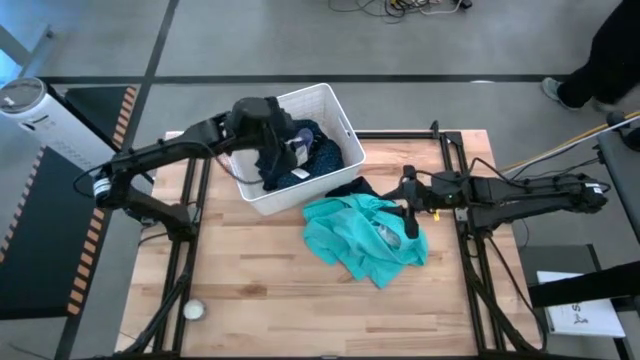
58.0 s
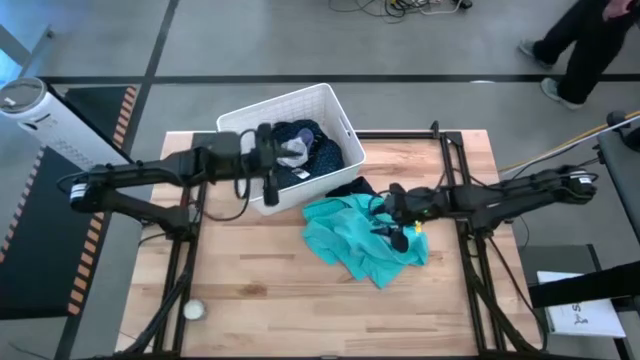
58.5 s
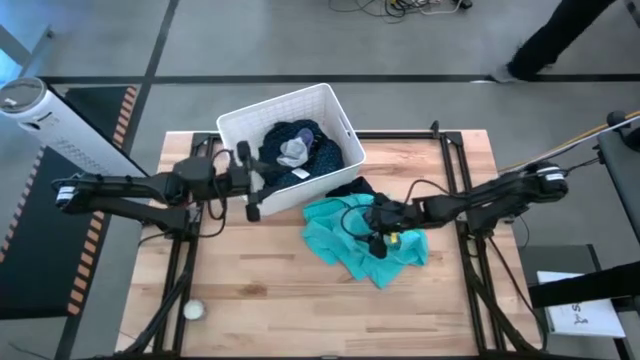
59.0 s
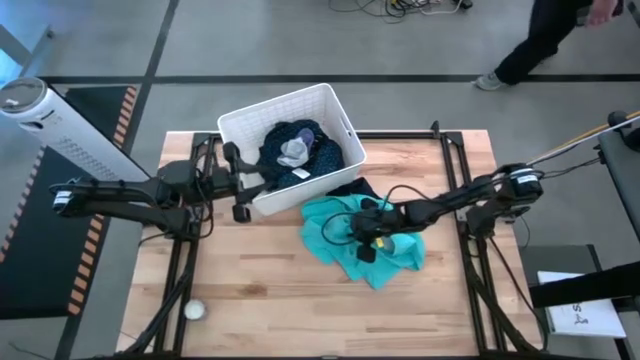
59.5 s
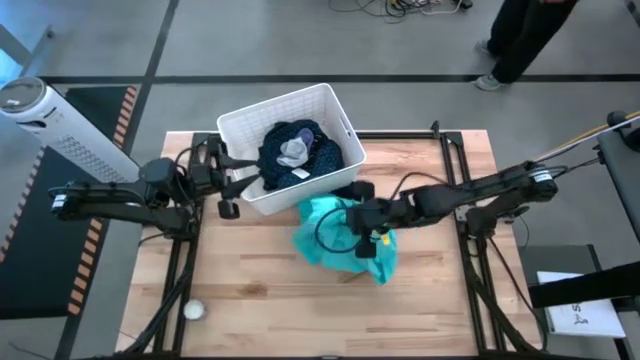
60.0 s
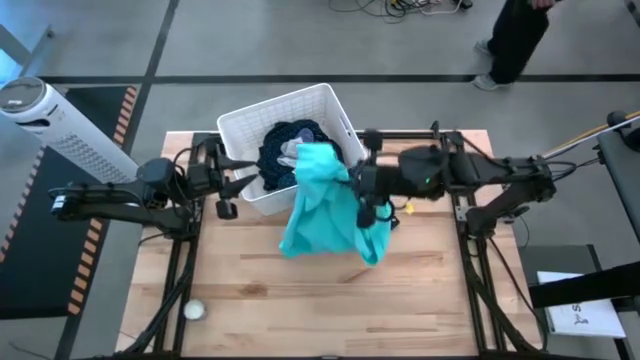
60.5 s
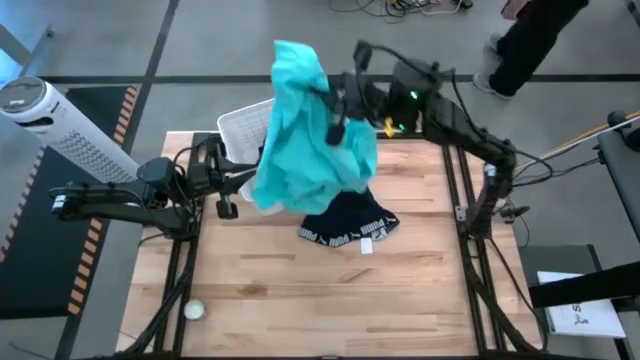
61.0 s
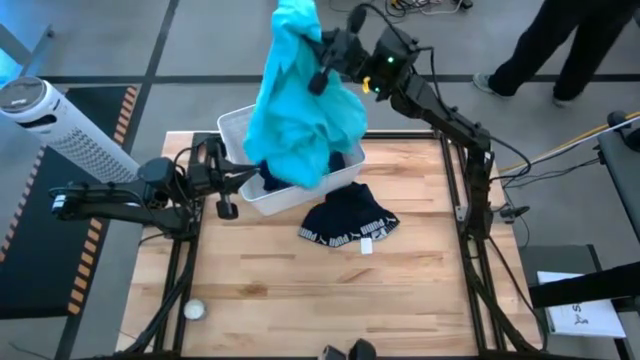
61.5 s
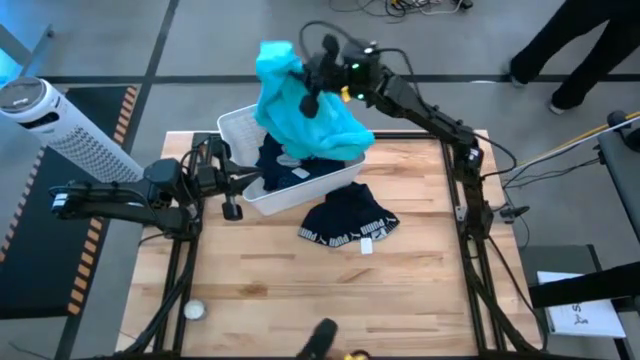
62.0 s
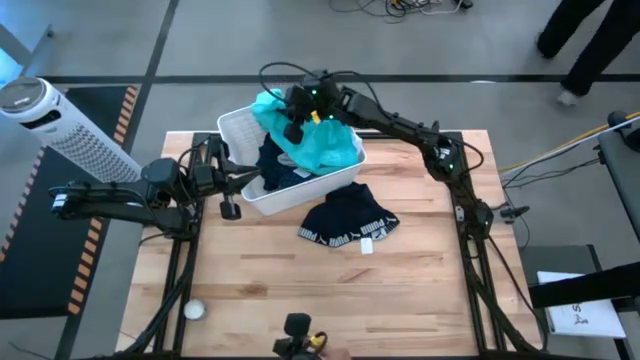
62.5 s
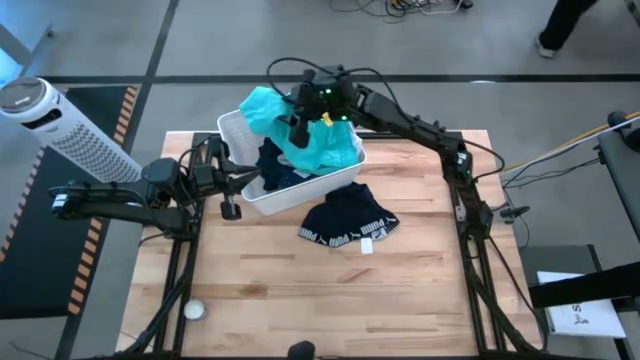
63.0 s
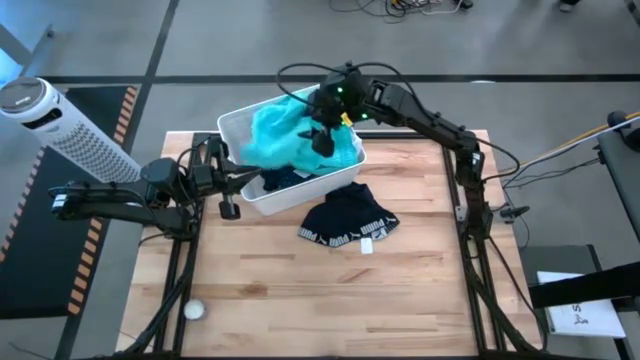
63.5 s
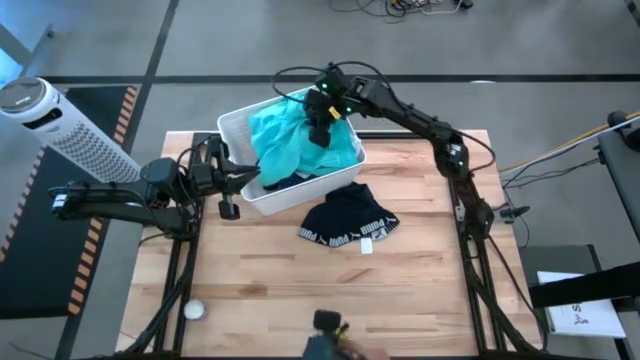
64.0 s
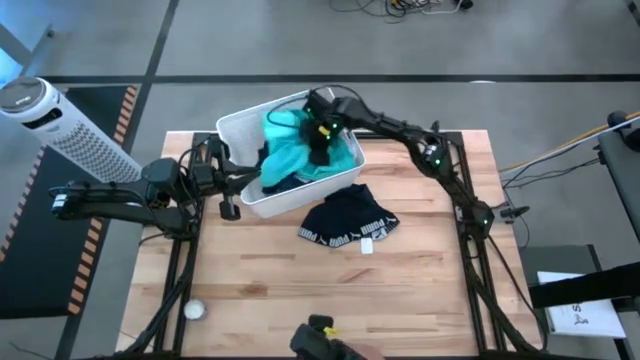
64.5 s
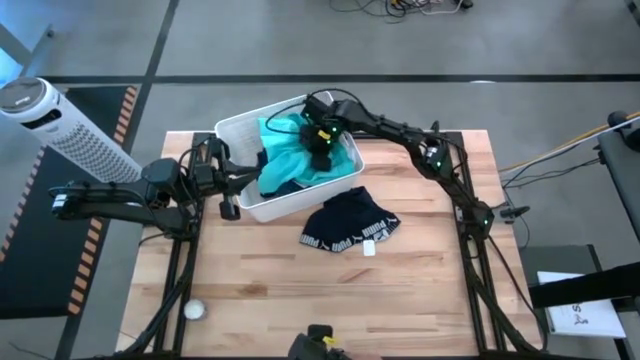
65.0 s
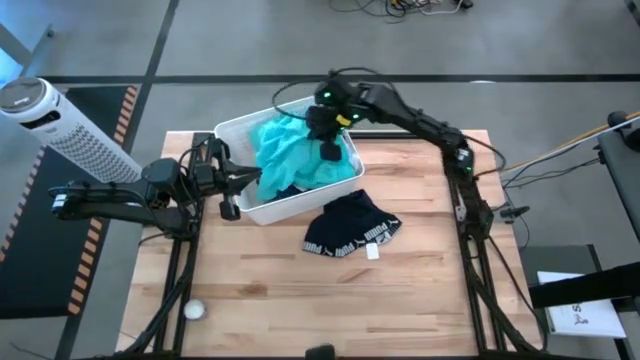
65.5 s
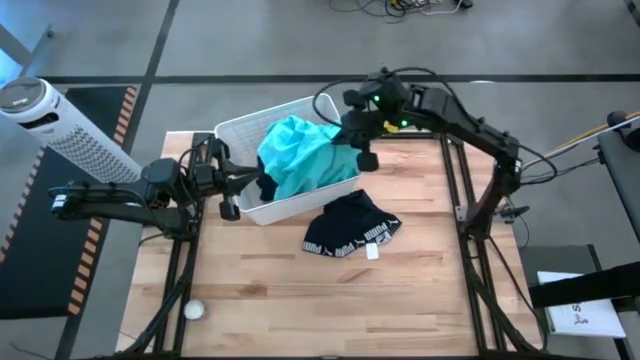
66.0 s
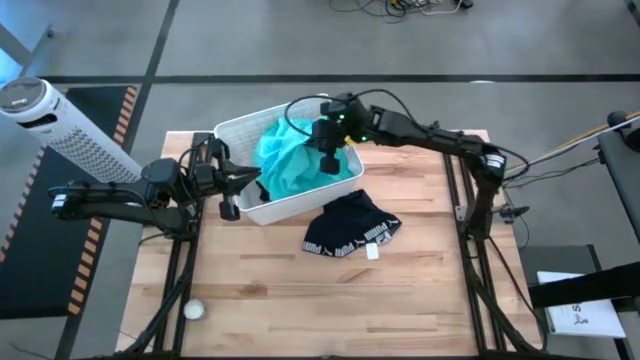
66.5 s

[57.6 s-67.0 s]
Task: Sort clothes
Put the light blue shorts into the white laundry bin

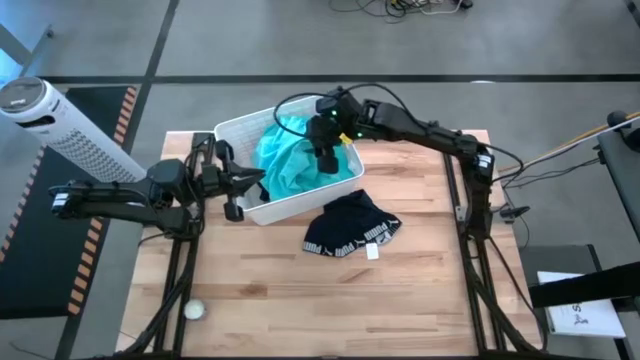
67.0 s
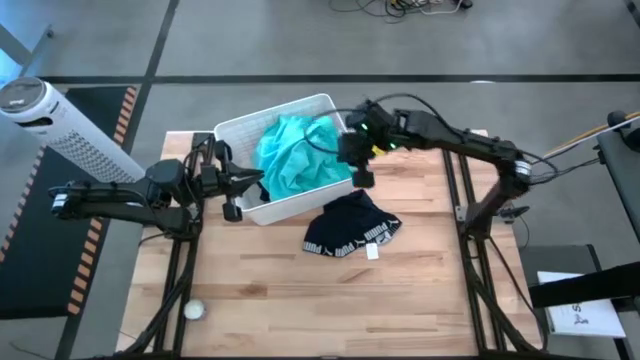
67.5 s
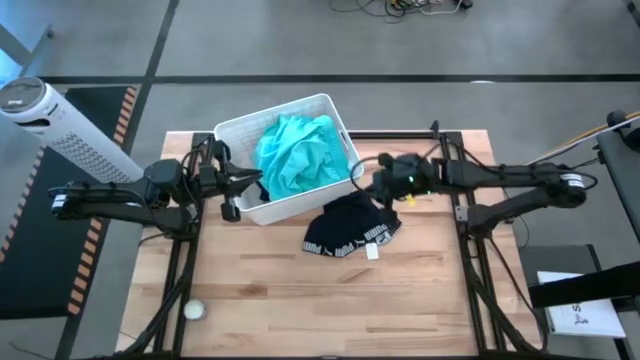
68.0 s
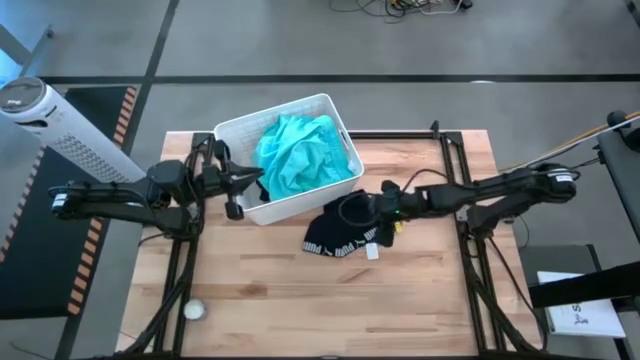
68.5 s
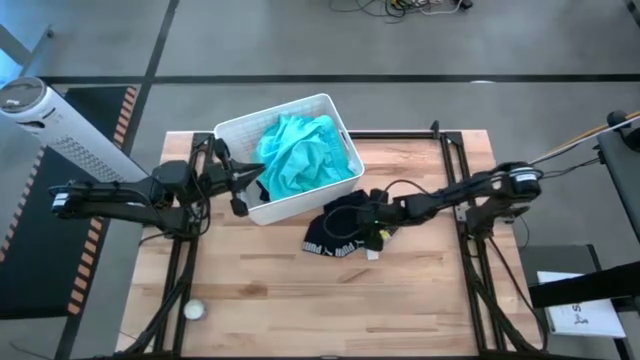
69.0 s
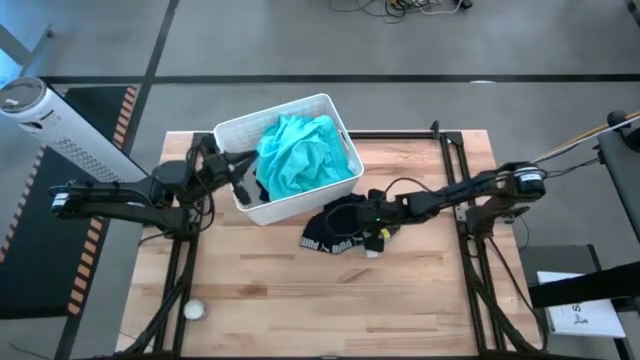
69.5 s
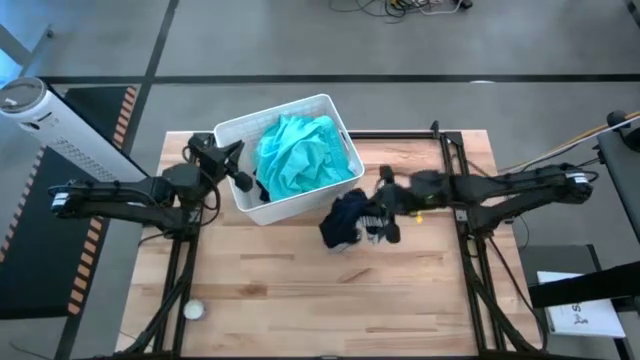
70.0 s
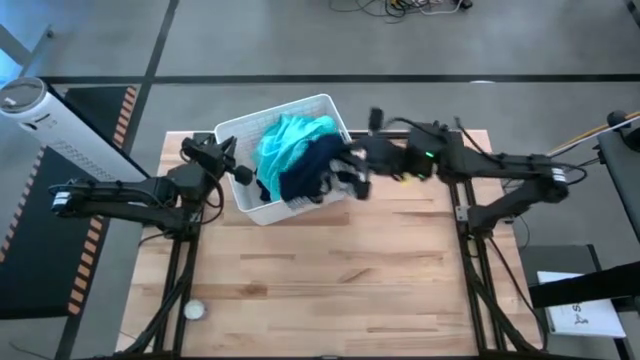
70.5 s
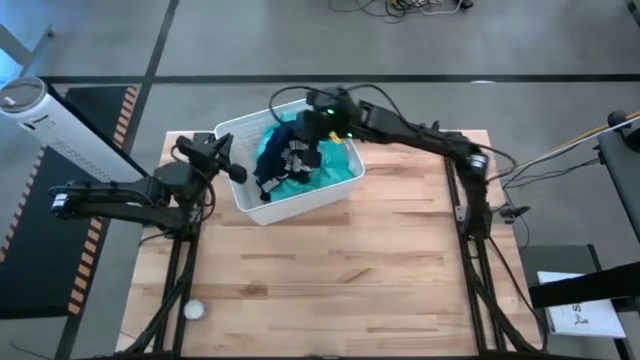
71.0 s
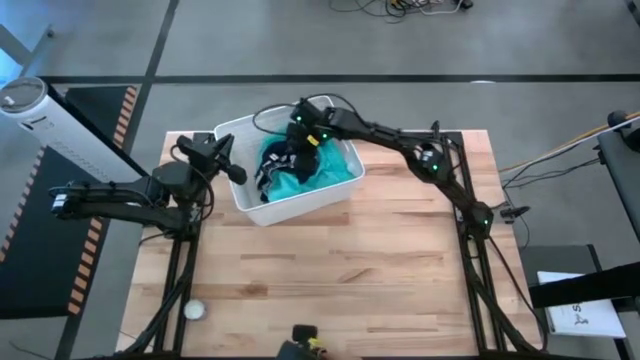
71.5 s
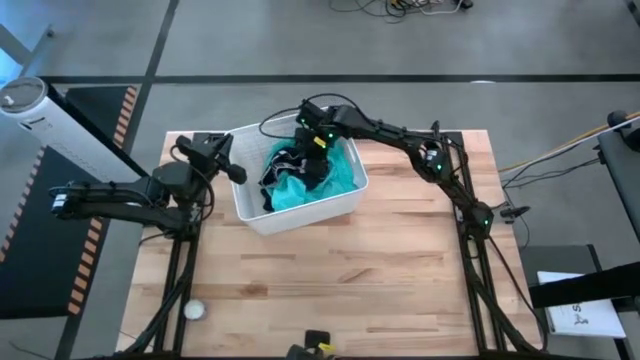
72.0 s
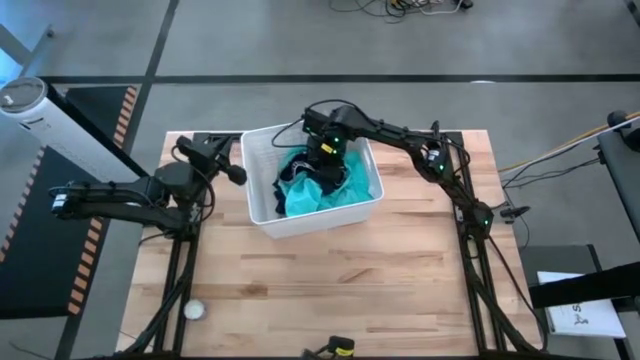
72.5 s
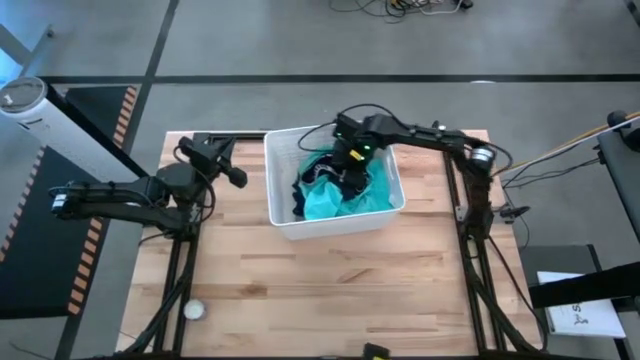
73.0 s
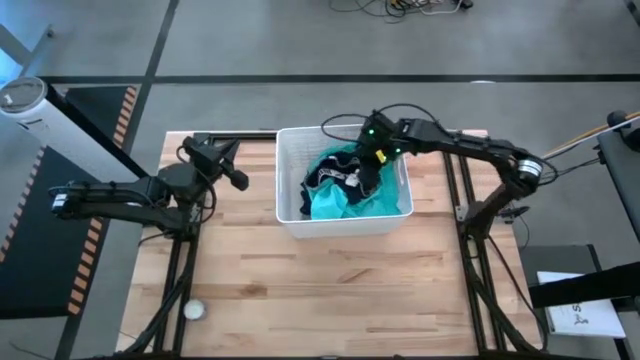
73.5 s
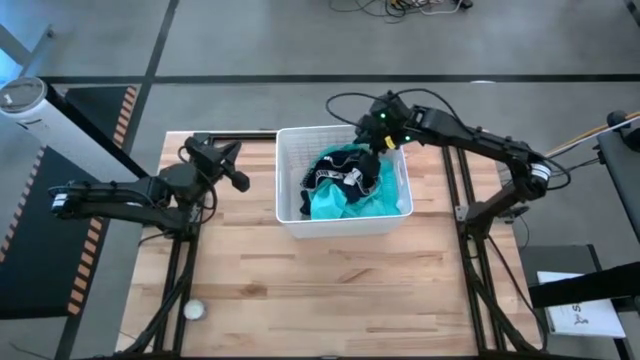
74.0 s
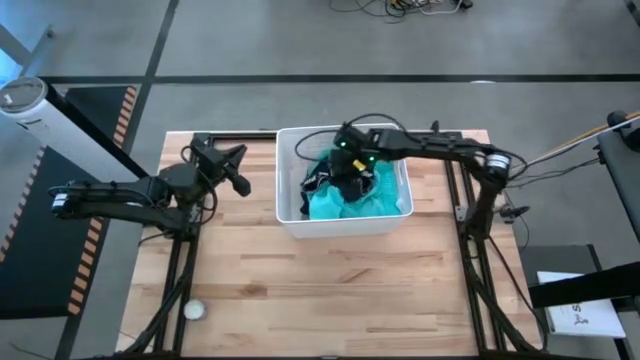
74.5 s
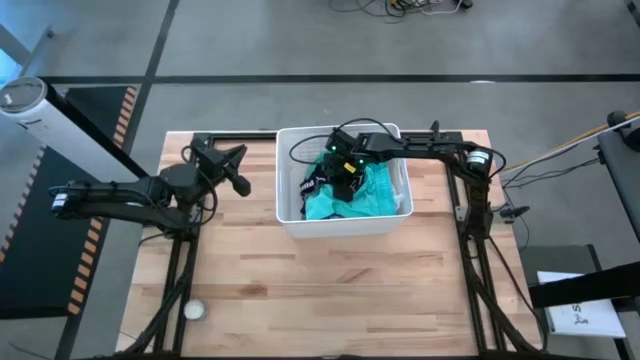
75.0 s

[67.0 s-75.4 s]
Put the dark blue boxer into the white laundry bin

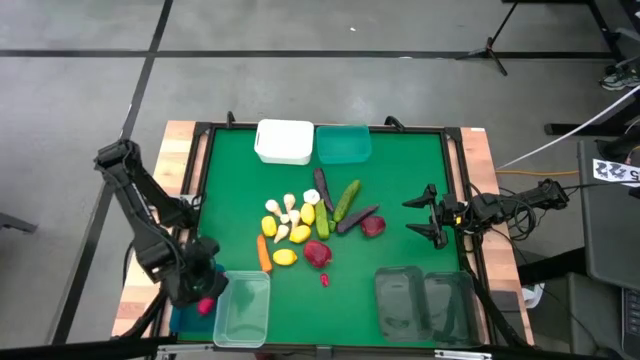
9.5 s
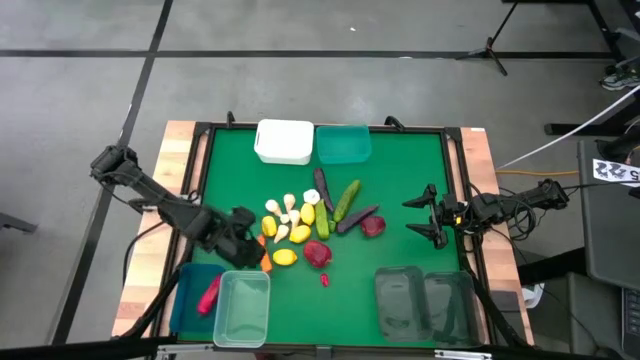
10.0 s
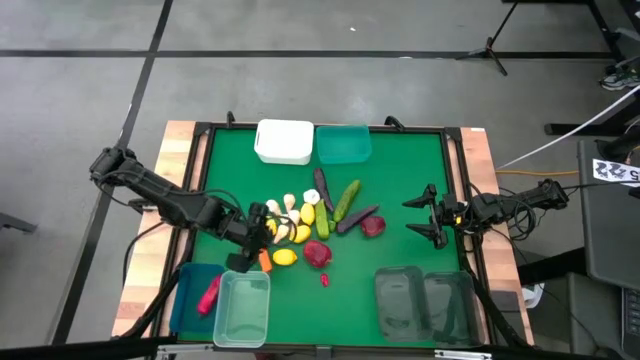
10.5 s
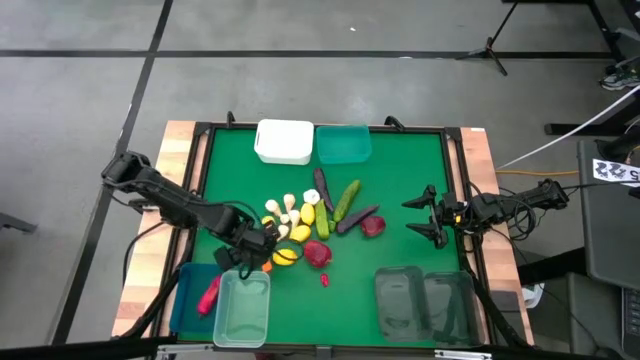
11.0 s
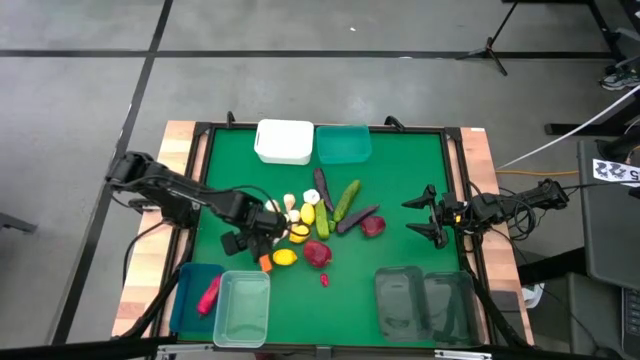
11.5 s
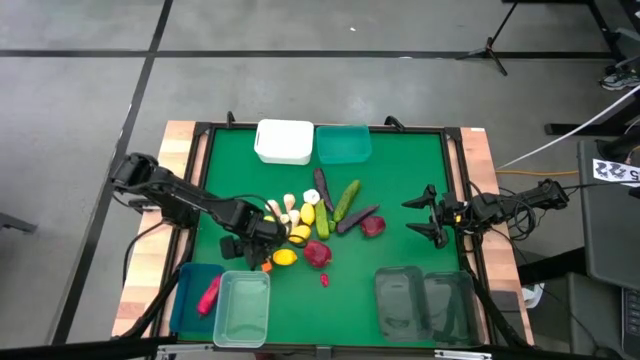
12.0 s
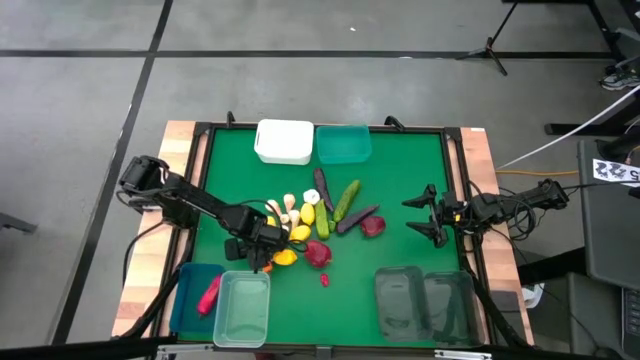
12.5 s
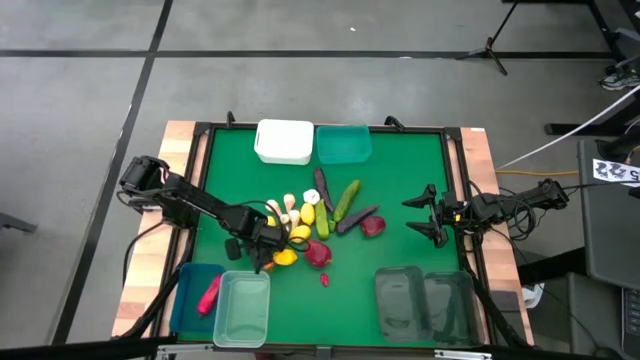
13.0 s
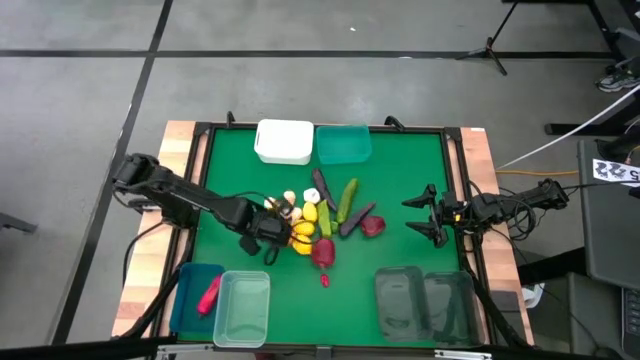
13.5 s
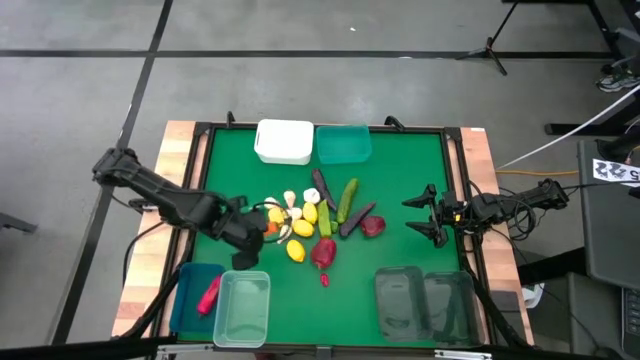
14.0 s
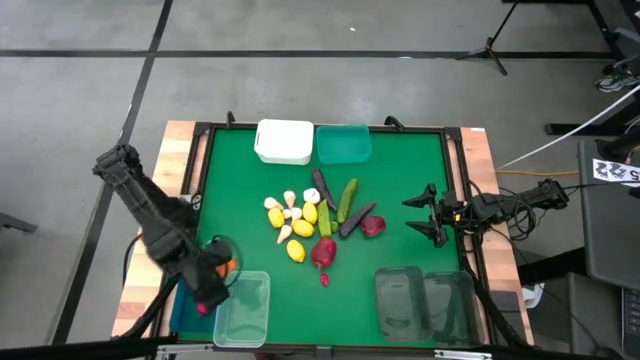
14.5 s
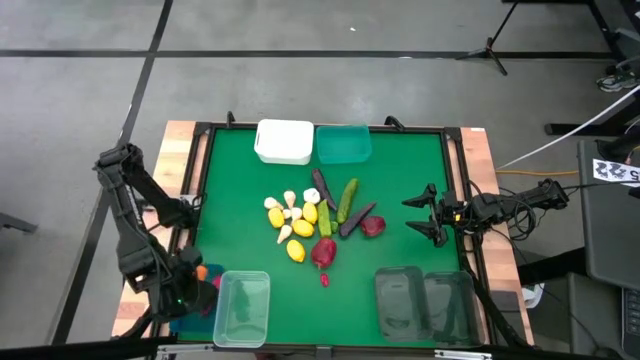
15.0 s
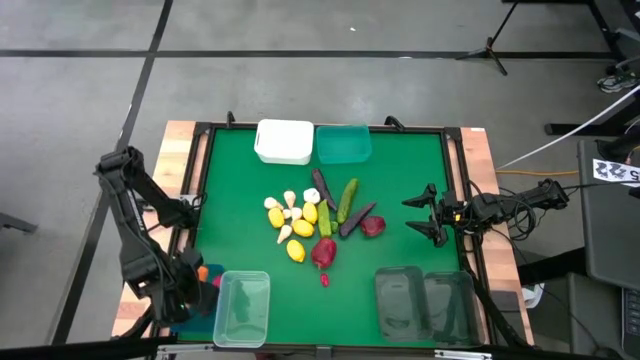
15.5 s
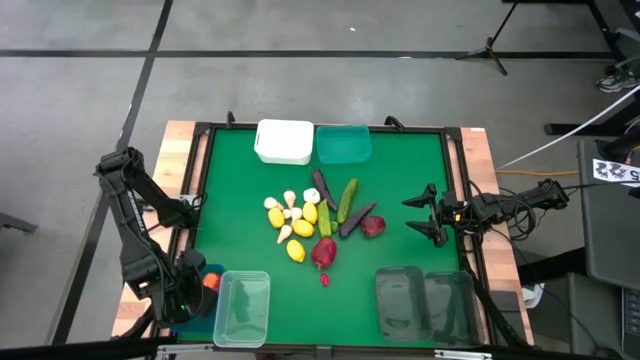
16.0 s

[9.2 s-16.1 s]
Task: Sort produce into baskets
Put the orange chili pepper into the blue bin
